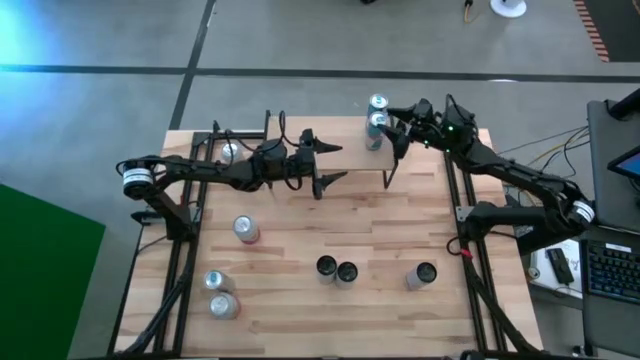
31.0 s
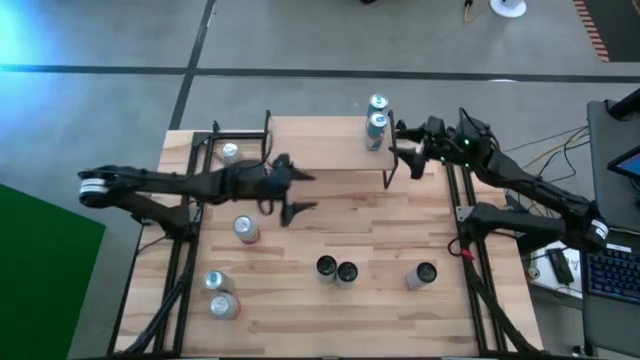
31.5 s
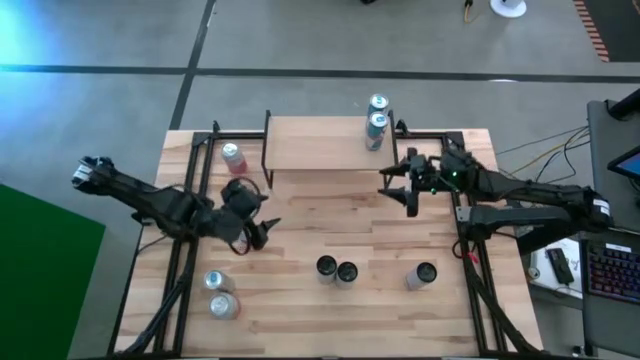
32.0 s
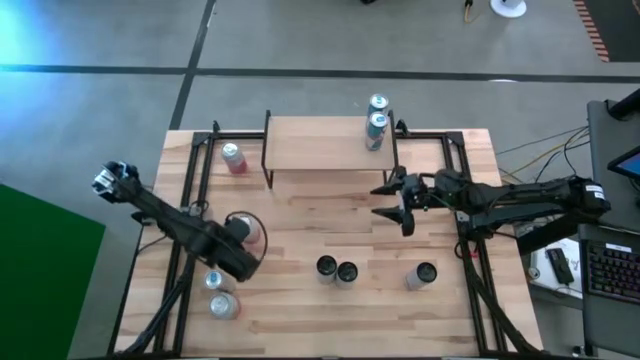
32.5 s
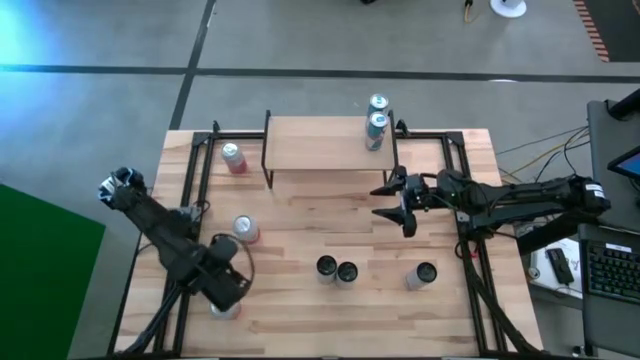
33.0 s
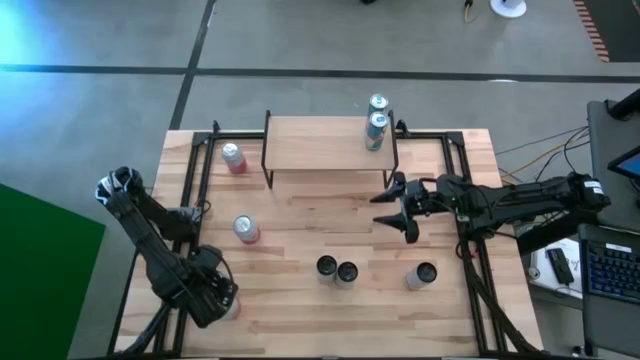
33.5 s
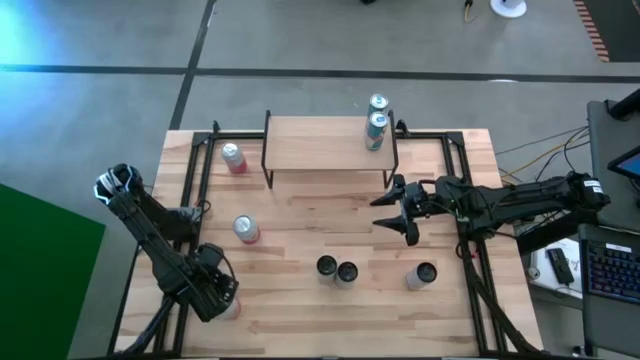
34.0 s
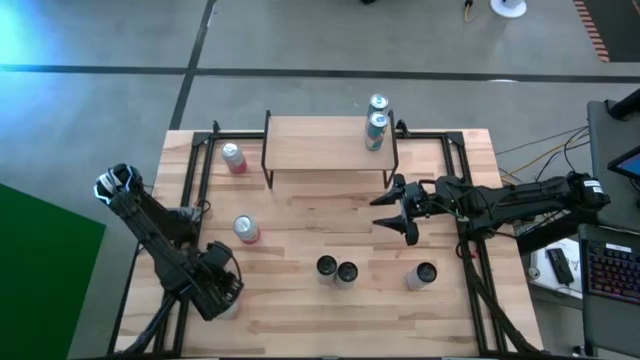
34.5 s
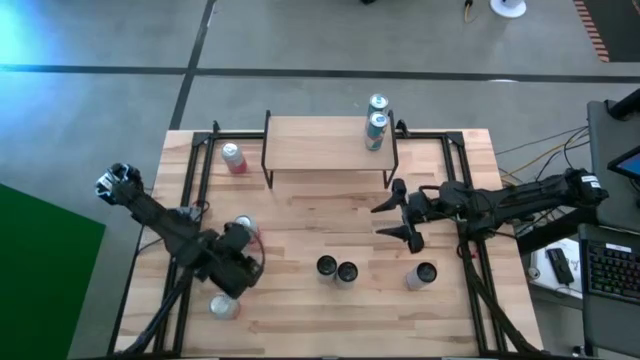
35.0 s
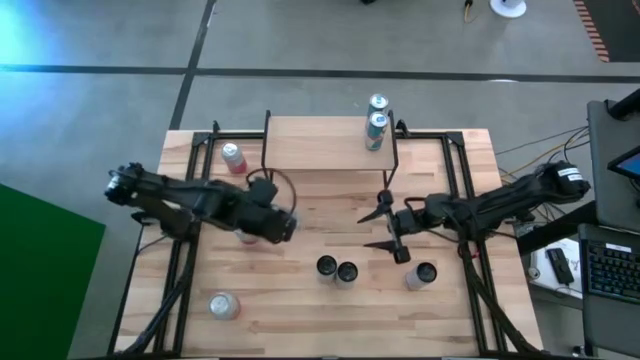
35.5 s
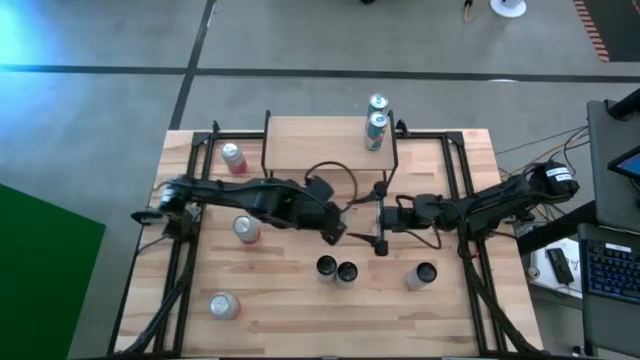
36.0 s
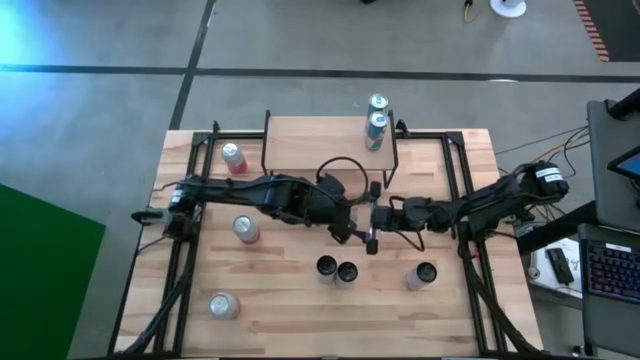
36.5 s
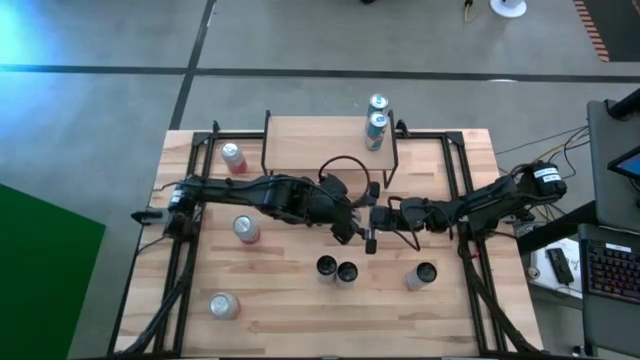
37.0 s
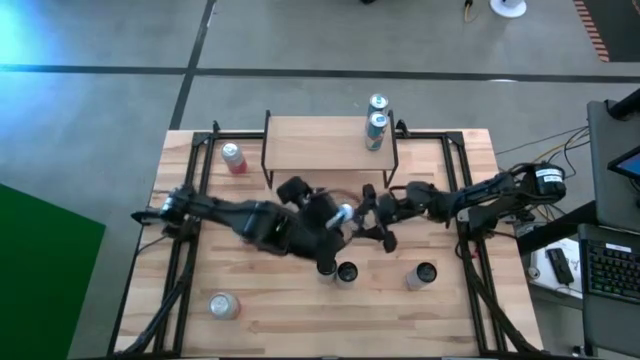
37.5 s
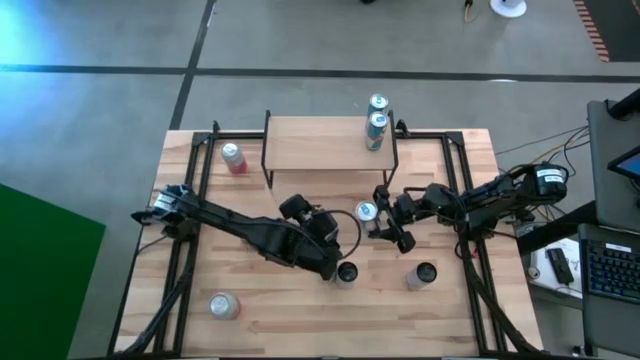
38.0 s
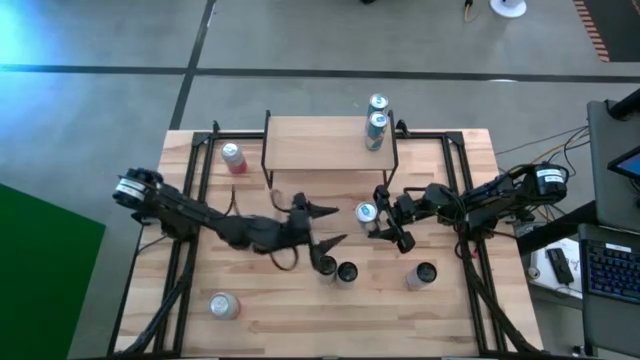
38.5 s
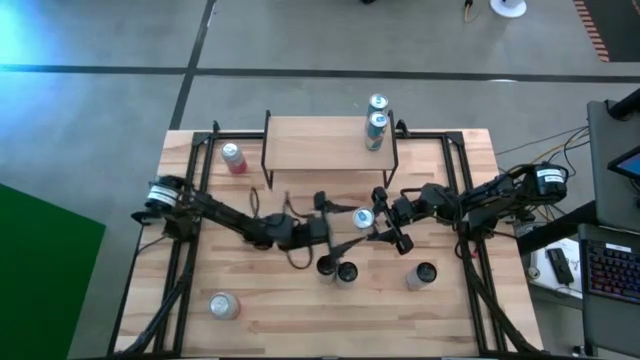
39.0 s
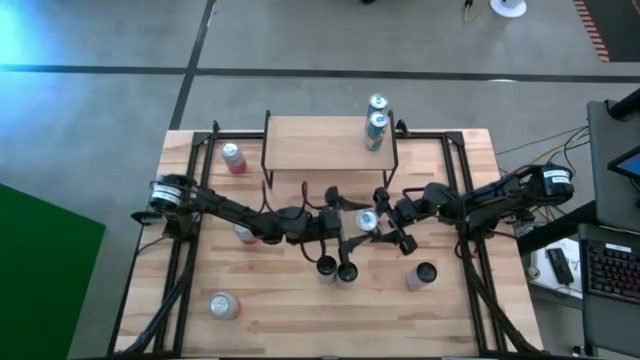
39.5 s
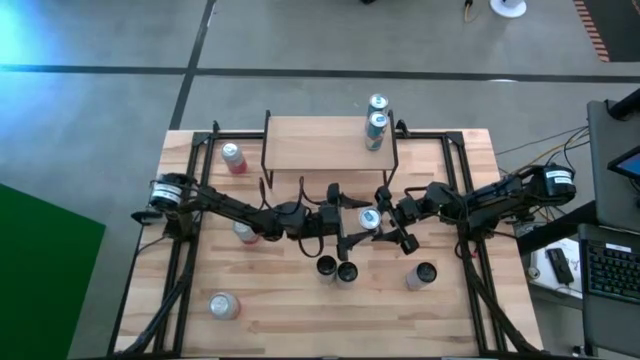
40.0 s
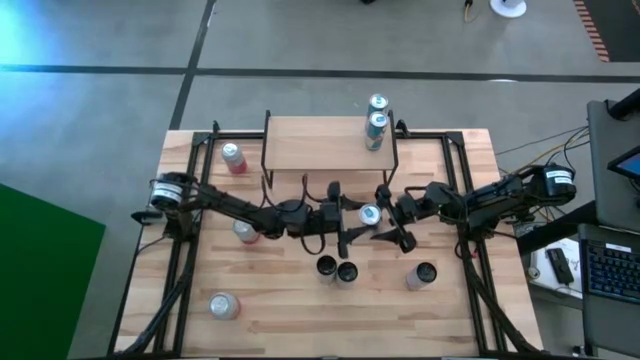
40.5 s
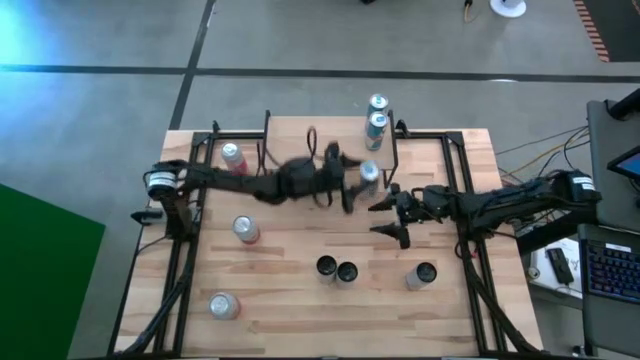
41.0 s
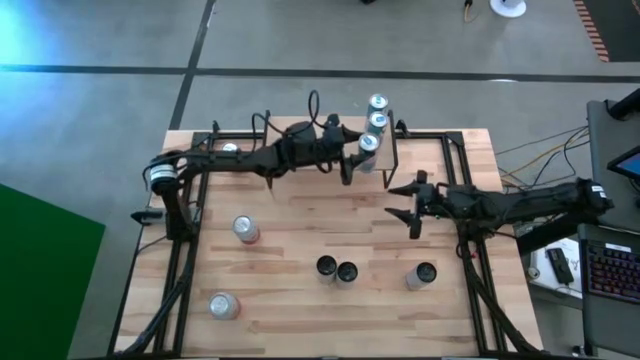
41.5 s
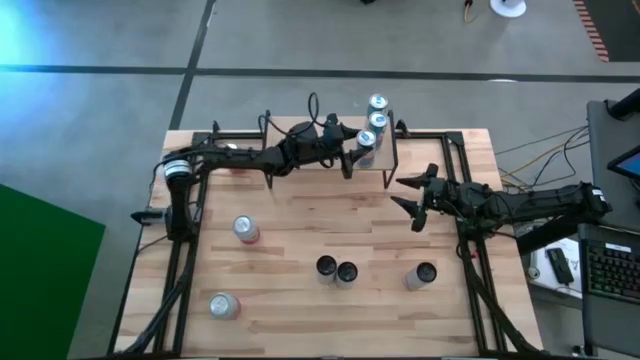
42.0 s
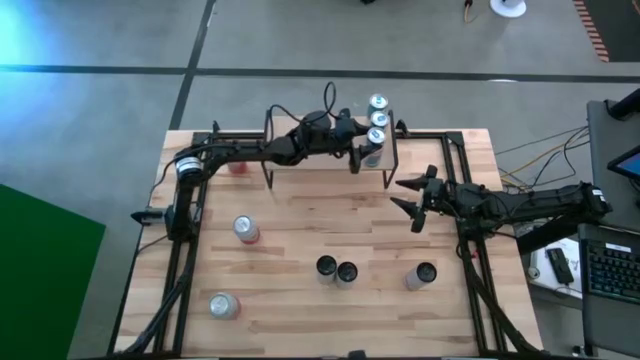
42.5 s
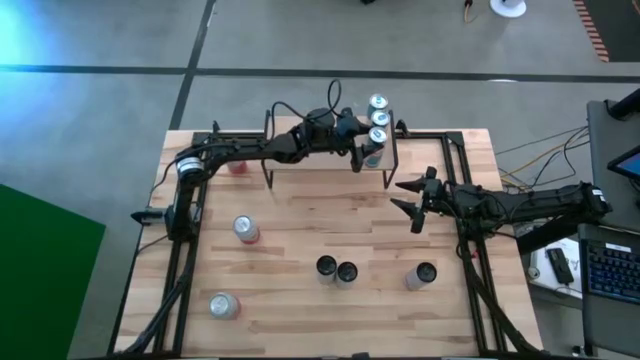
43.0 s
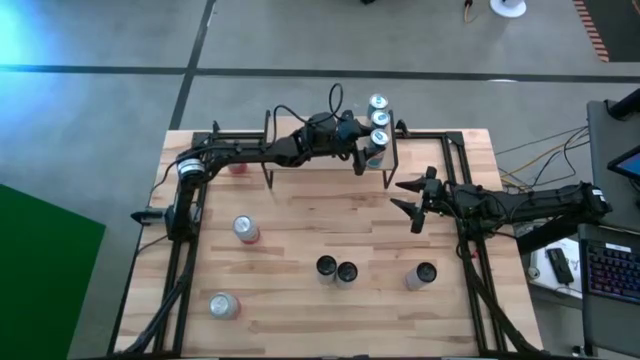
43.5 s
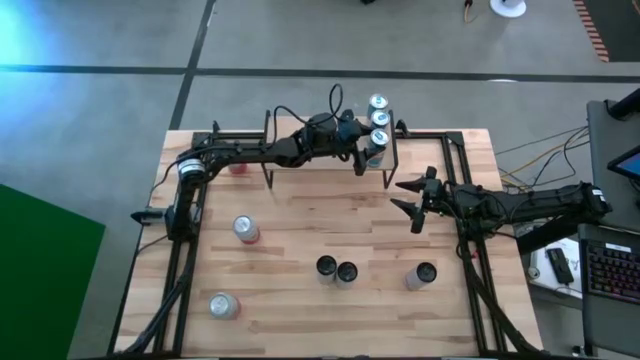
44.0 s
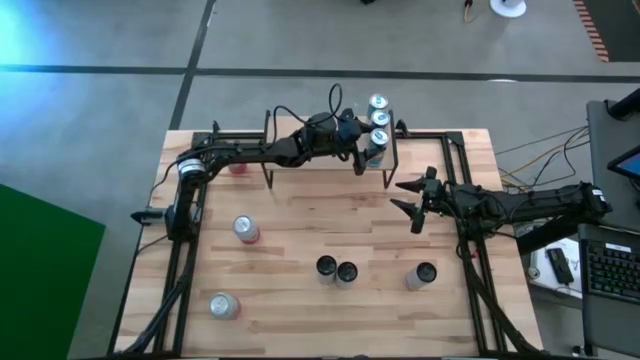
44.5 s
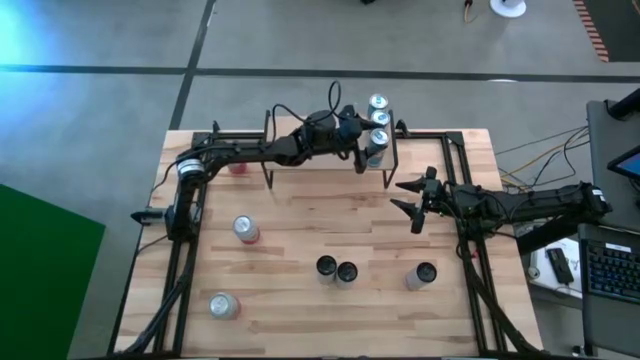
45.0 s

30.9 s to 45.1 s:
Task: Place canned beverage on shelf
Put the blue soda can on the shelf aligned with the other blue soda cans

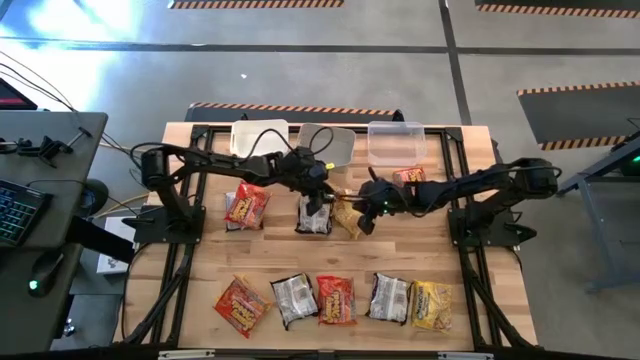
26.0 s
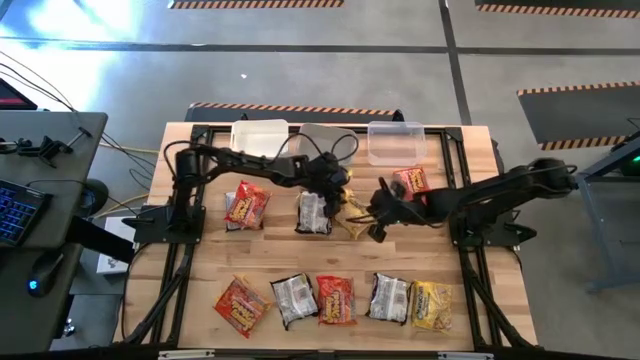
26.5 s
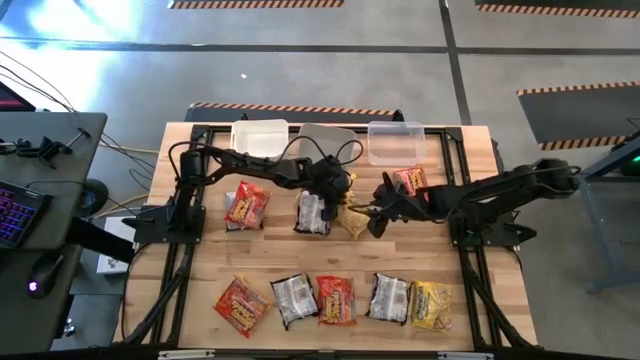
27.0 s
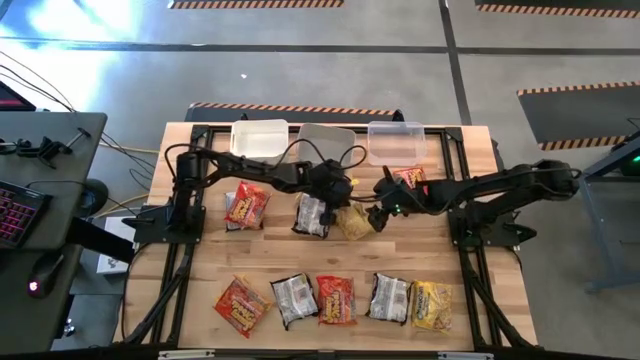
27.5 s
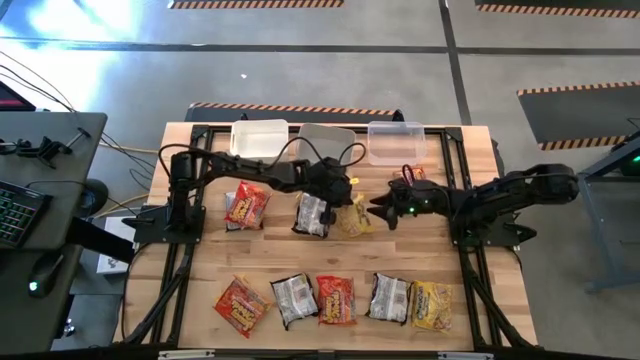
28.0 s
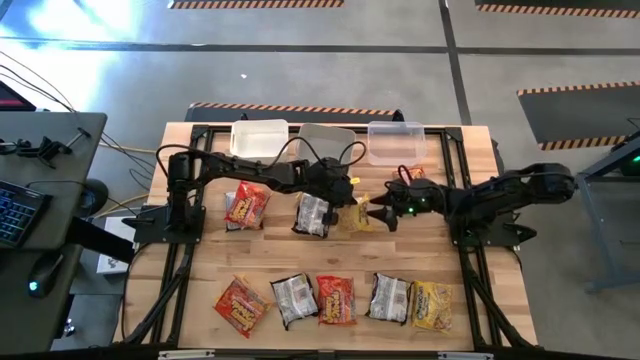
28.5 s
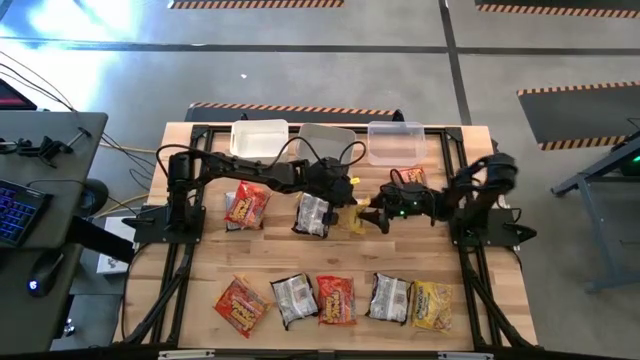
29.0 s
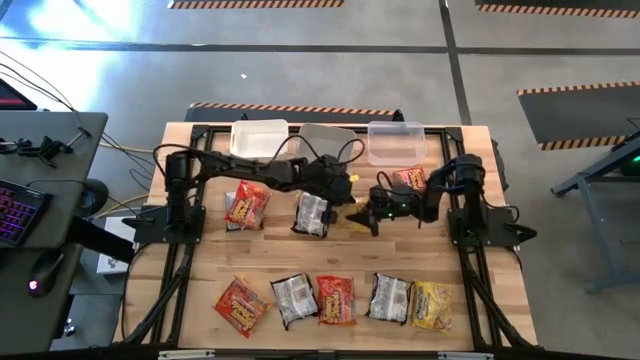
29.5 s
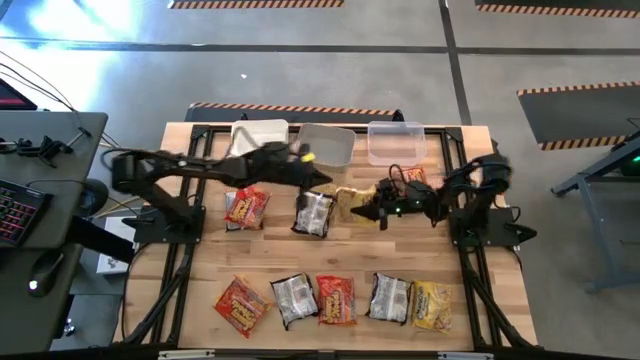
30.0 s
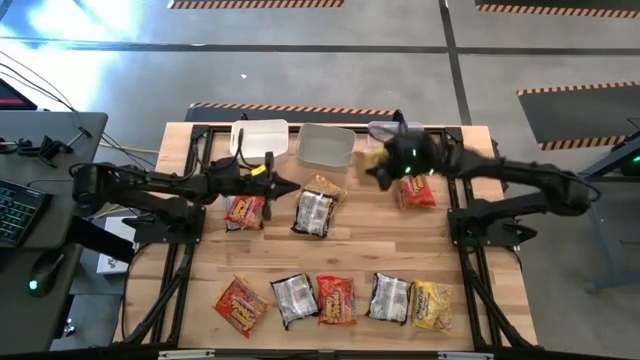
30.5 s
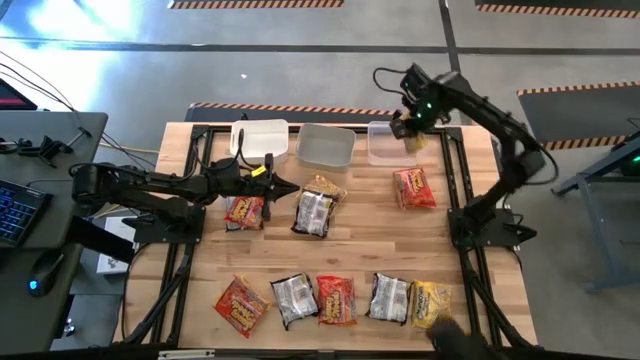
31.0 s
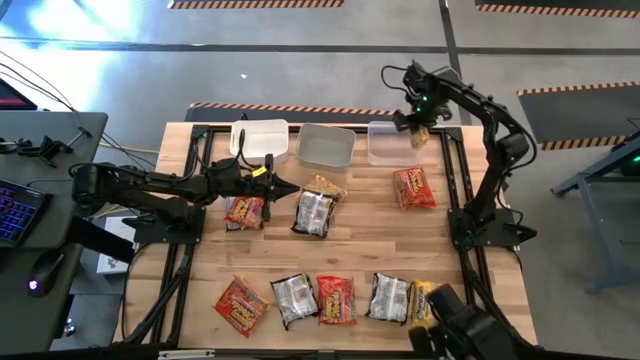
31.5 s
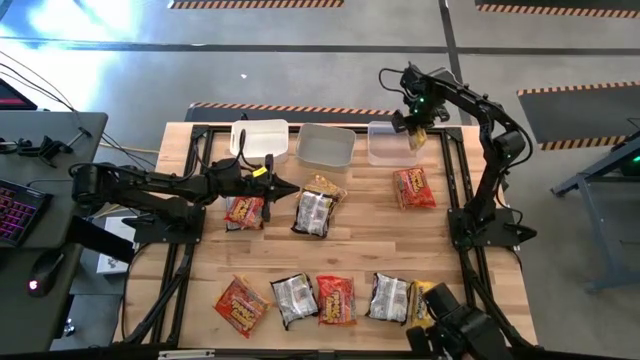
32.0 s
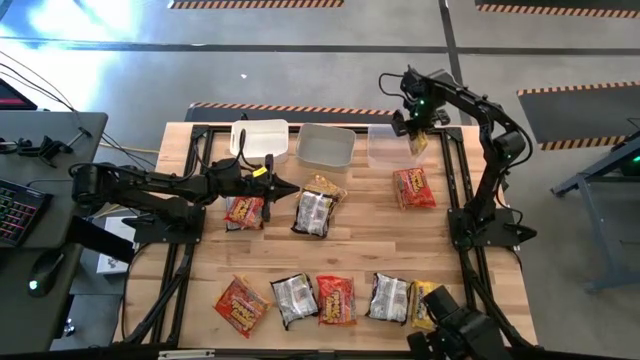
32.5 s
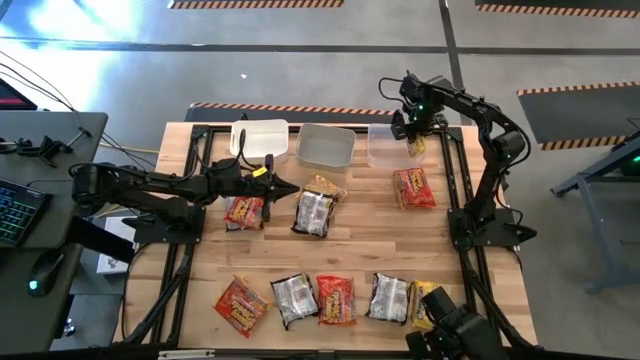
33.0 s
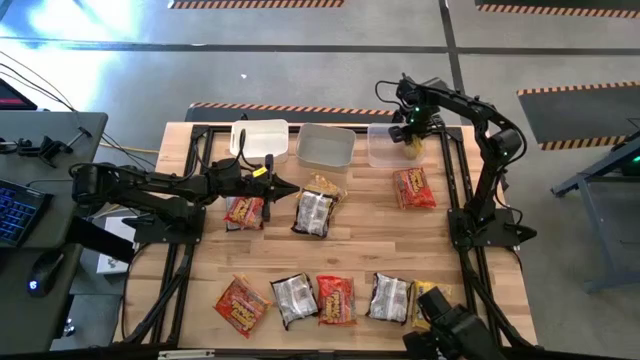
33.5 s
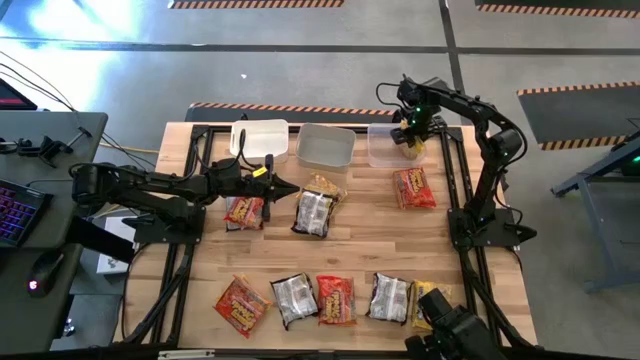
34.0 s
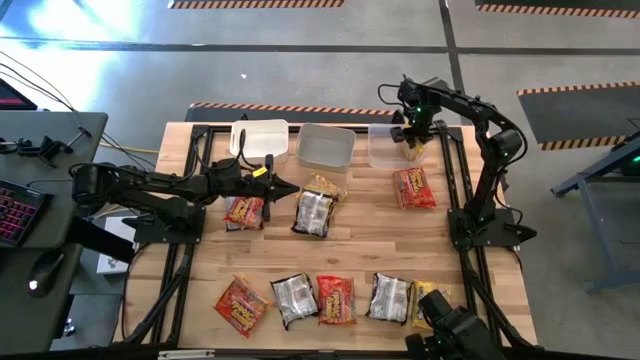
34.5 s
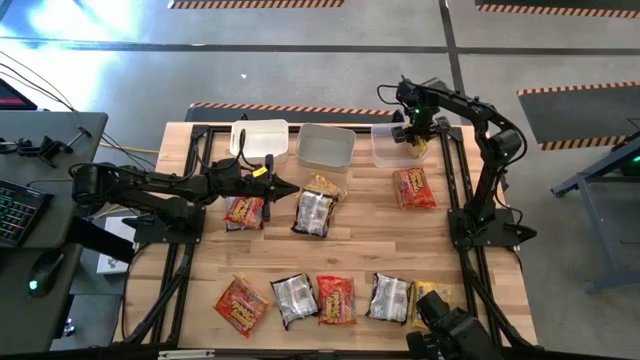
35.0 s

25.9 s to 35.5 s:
Task: Sort Maruchan noodles
Put the yellow noodle pack into the transparent bin
